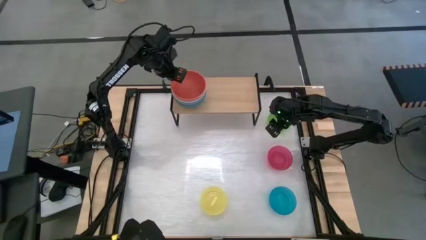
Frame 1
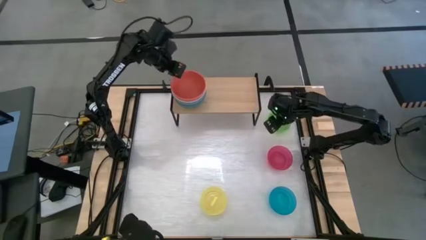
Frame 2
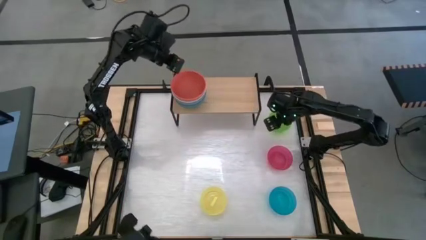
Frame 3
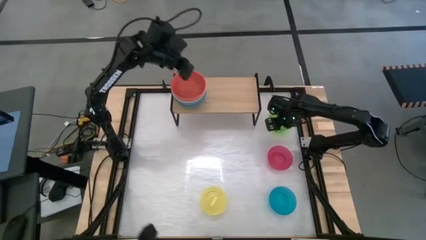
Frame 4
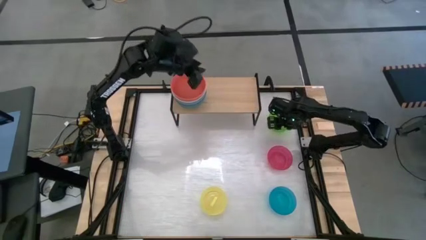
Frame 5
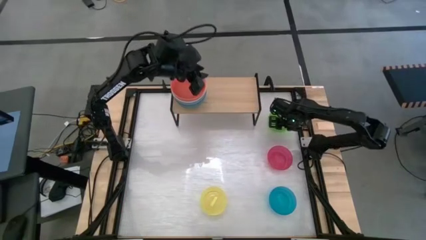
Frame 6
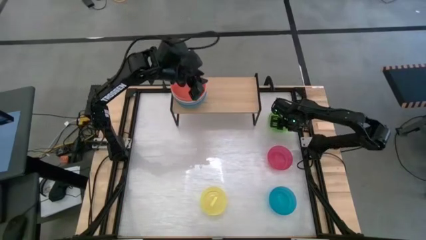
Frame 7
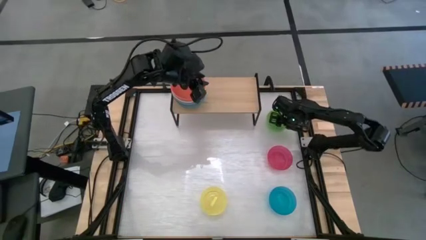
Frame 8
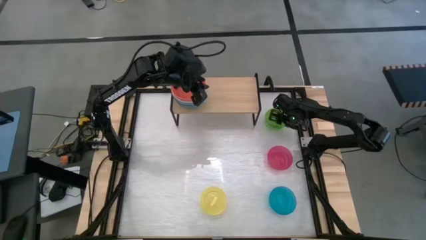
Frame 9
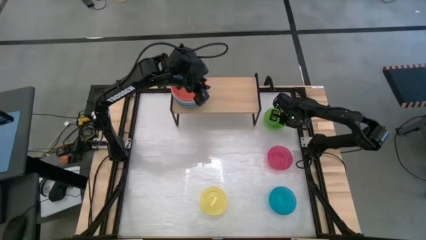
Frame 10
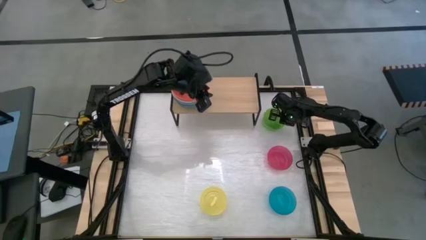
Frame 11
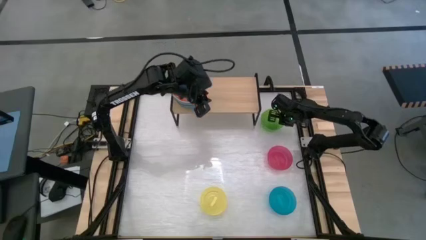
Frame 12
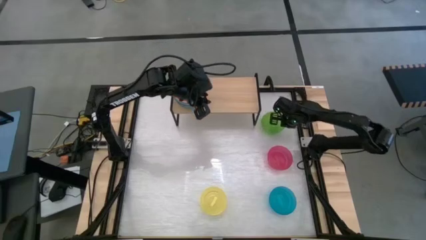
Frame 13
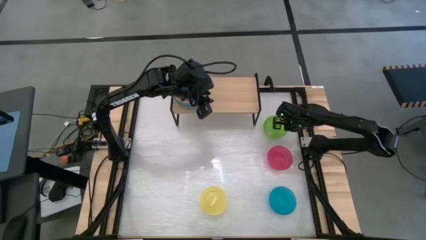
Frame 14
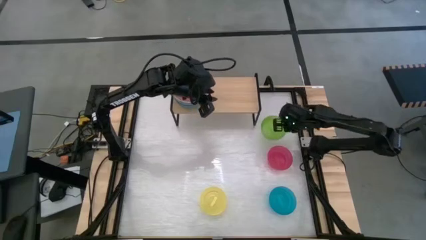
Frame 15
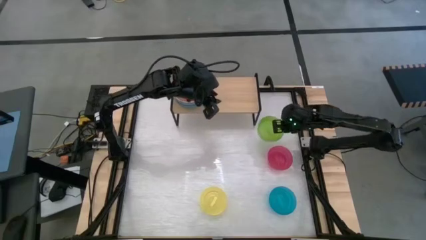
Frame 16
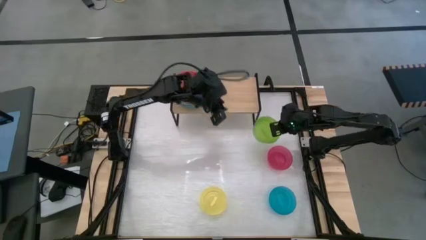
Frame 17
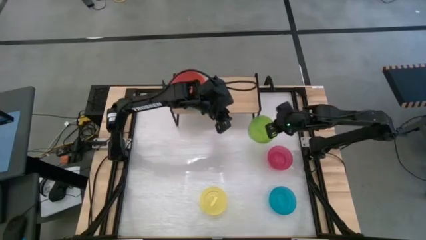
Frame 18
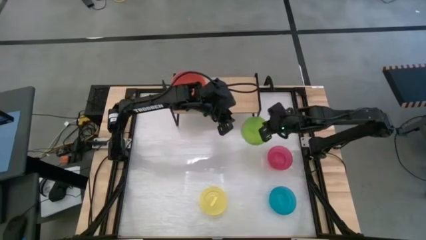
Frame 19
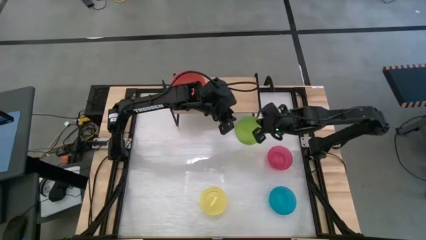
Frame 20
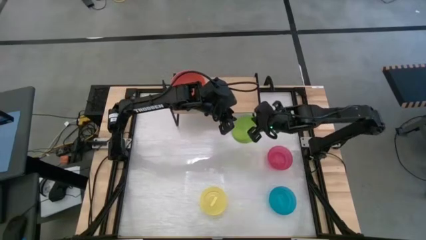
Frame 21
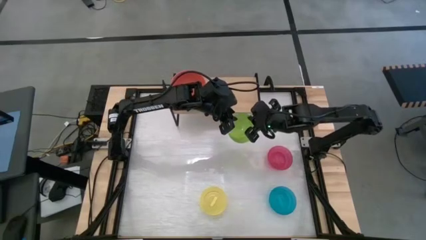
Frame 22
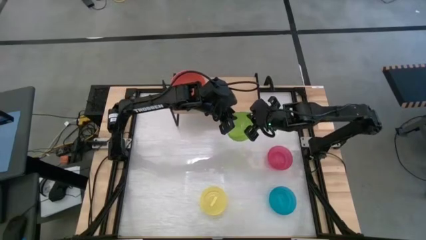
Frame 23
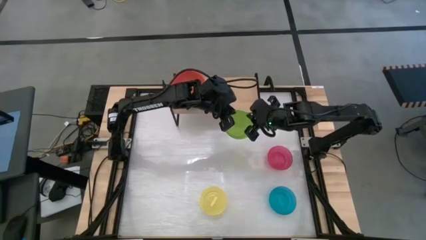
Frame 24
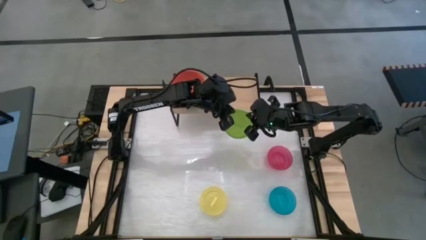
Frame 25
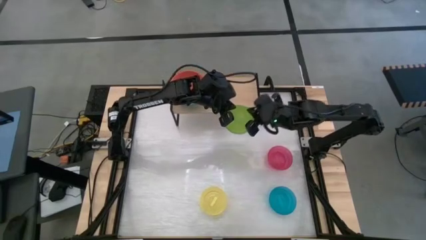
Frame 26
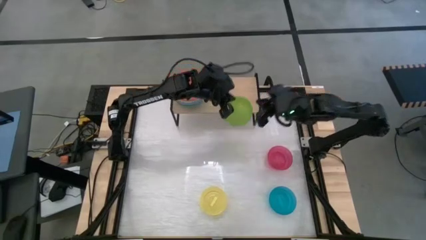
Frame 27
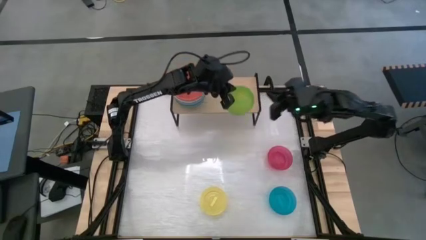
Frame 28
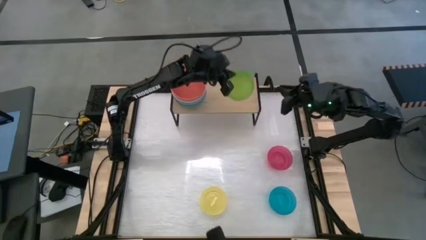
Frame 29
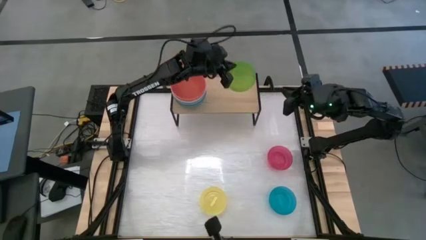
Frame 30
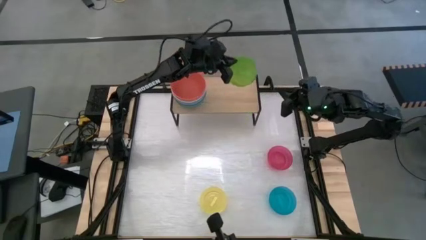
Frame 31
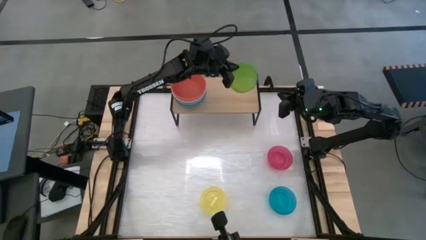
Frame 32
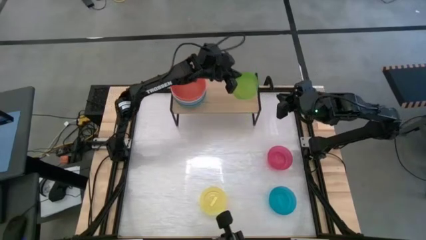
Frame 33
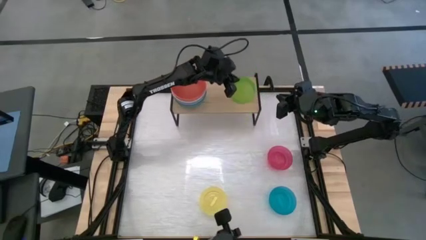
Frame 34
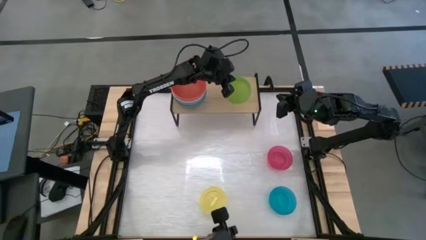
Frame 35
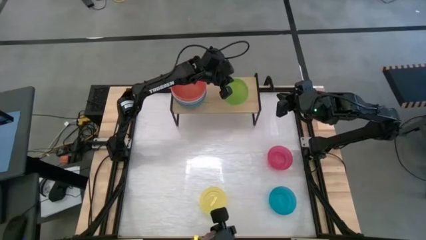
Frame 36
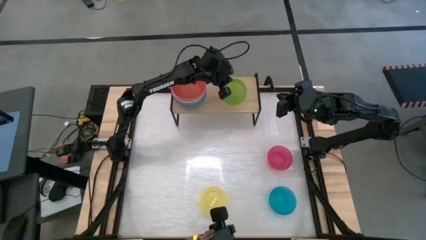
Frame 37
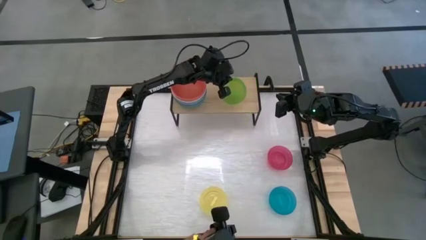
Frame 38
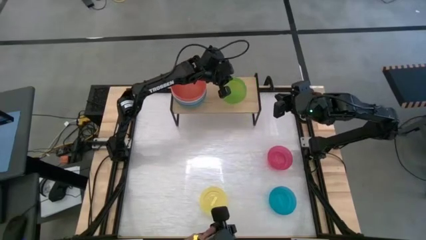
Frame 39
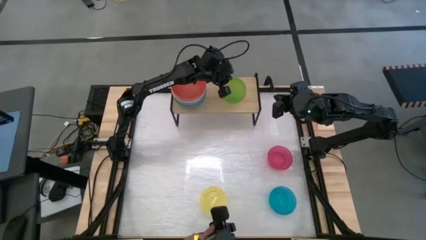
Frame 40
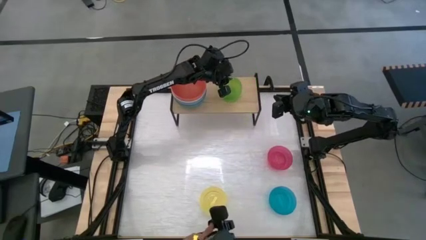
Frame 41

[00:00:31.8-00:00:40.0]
Task: Place and stack bowls onto a shelf
Put the transparent green bowl on the shelf

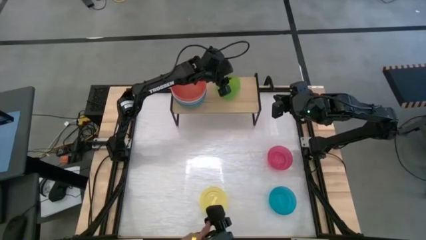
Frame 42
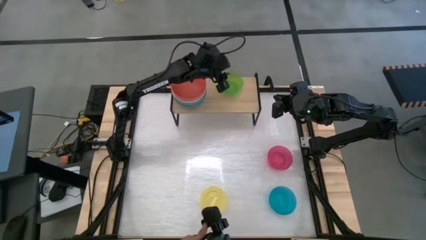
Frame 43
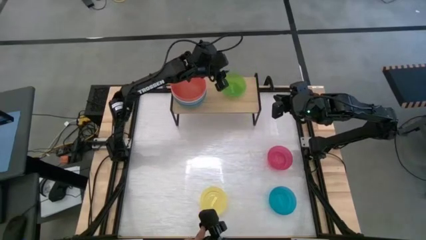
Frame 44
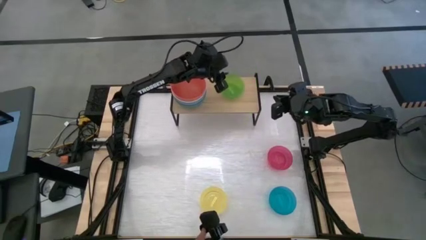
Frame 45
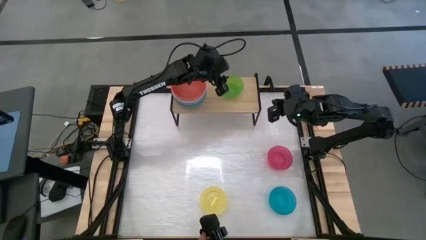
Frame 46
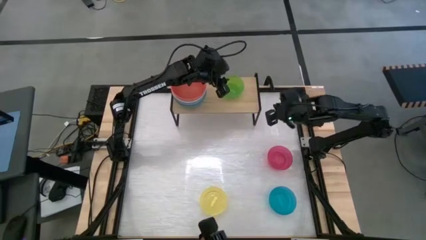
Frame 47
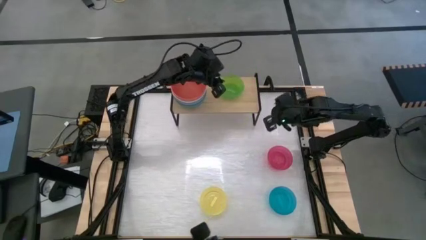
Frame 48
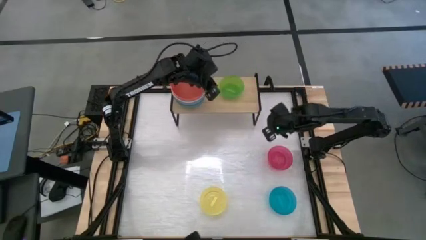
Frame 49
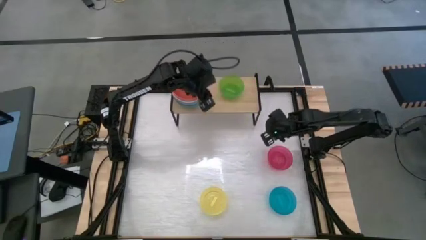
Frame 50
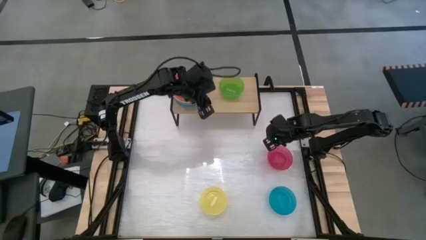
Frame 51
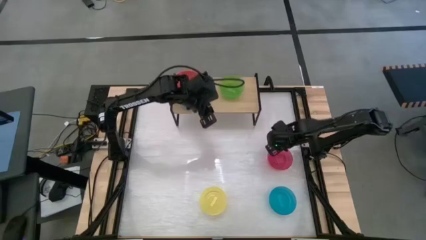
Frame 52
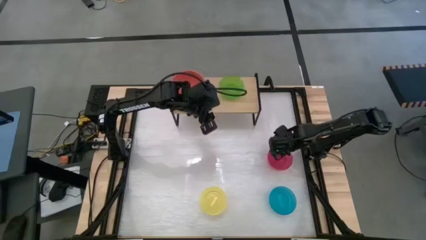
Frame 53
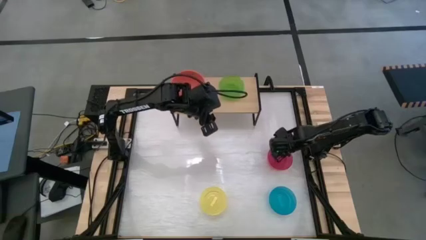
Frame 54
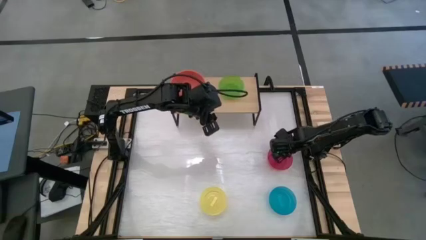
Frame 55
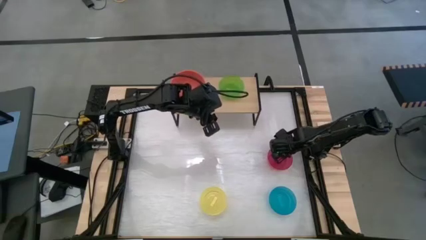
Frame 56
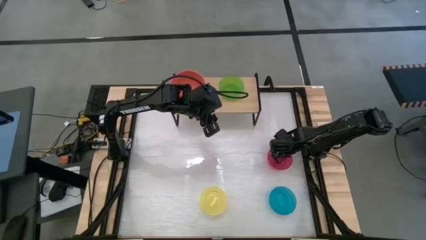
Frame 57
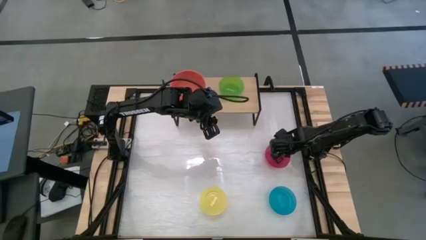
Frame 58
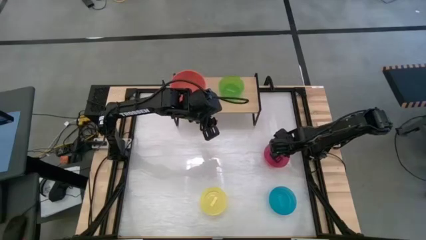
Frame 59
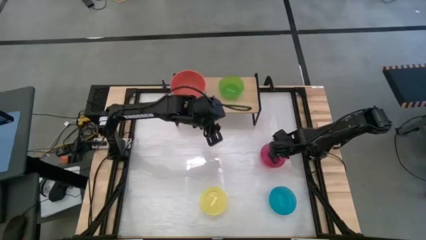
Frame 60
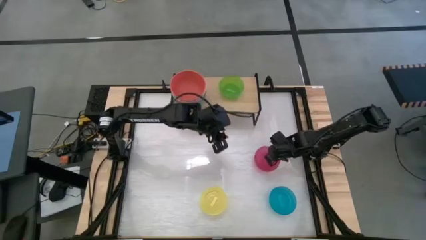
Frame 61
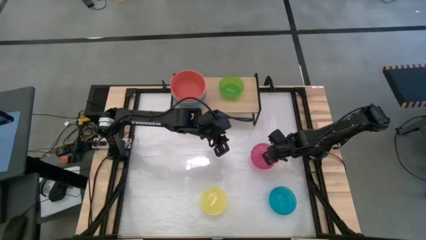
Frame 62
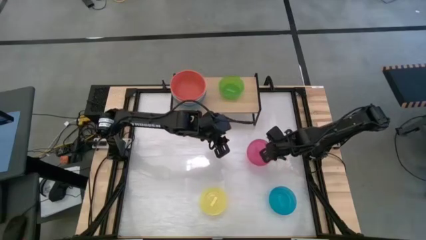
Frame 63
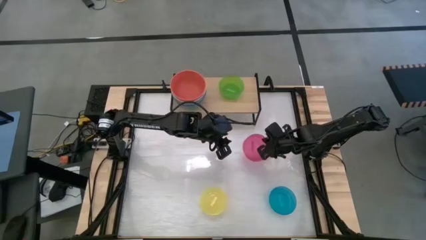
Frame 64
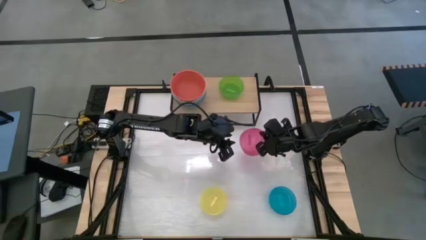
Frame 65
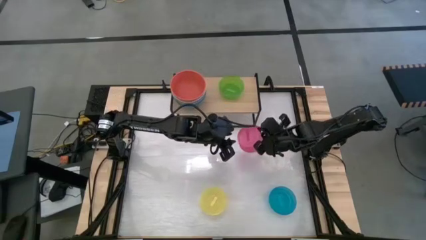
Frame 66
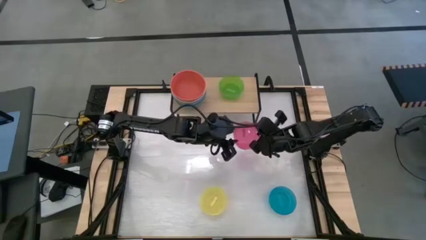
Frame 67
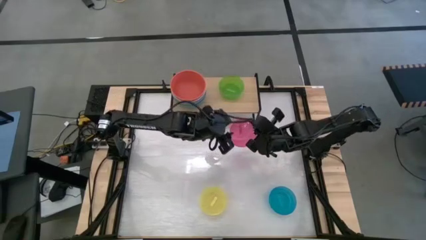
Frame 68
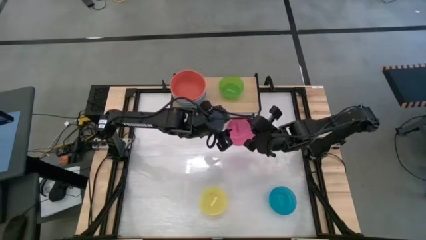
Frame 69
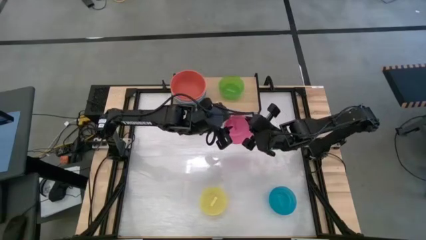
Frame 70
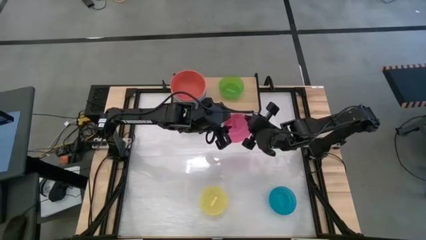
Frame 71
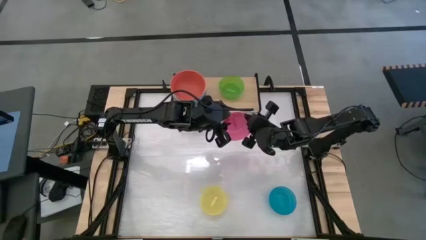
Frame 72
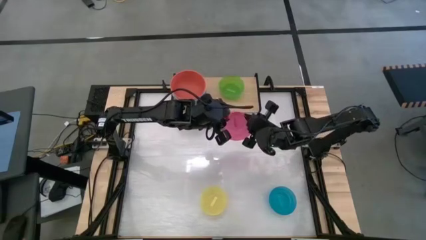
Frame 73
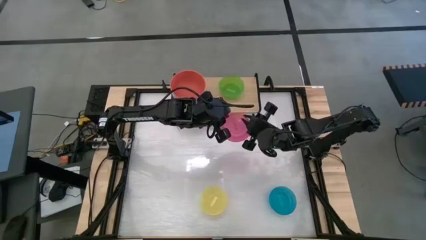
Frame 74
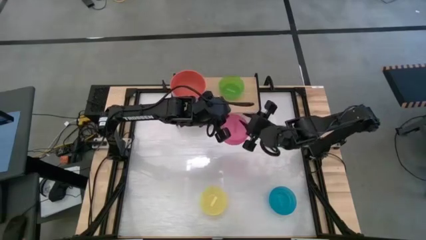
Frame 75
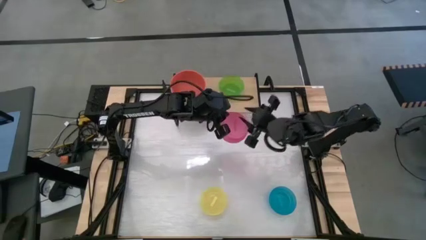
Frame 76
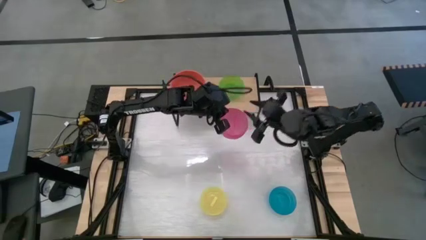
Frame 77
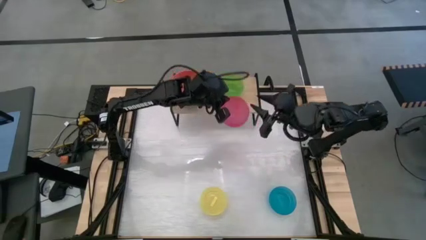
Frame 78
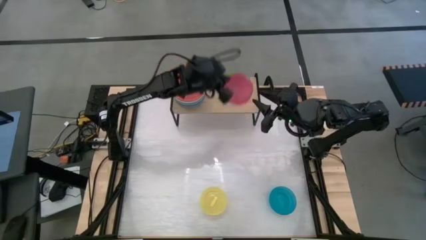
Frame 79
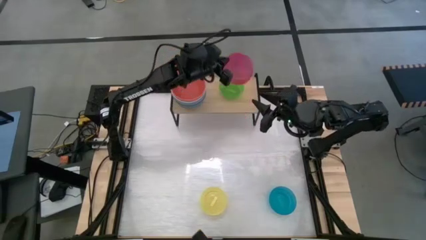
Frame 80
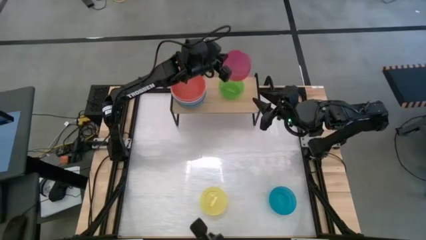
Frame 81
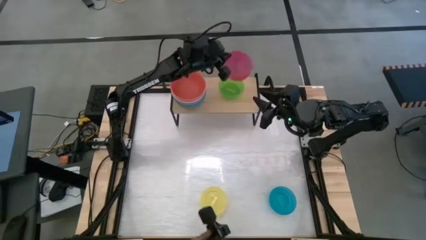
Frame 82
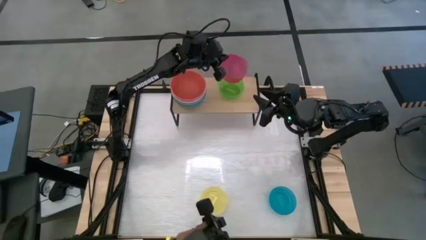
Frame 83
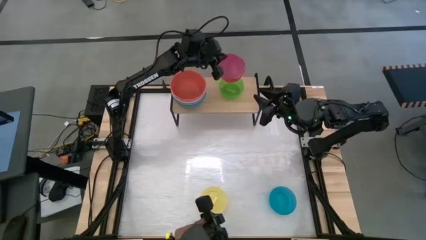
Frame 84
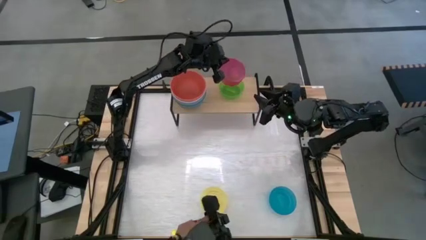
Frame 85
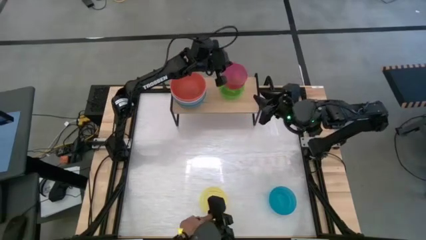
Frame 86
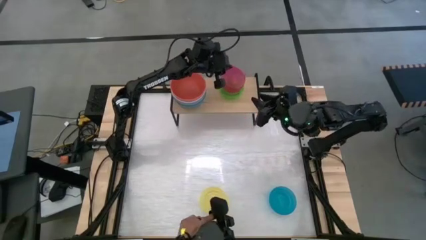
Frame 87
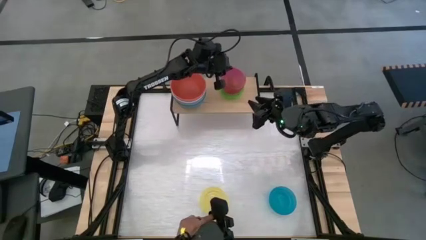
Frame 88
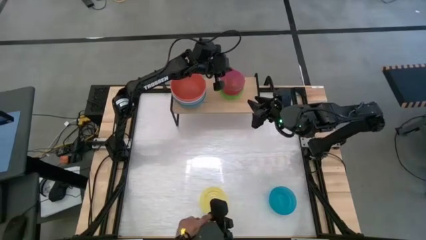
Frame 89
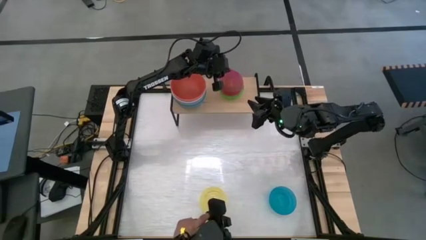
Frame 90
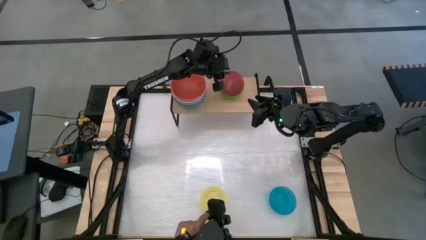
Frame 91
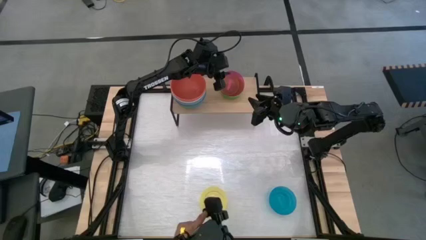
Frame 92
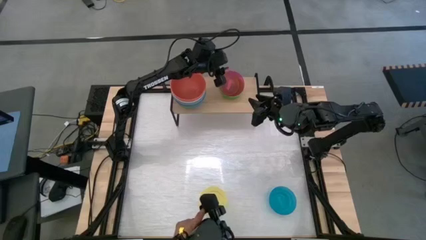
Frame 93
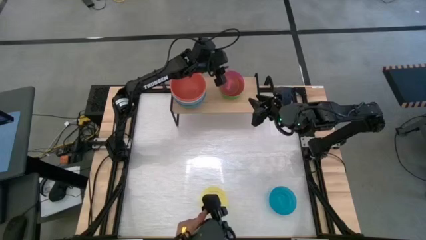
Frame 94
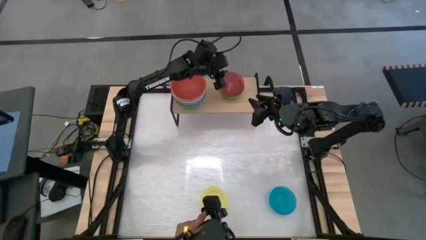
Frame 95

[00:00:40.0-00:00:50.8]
Stack the transparent pink bowl on top of the transparent green bowl on the shelf
